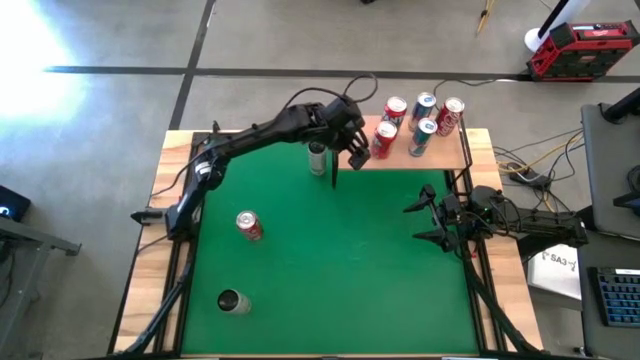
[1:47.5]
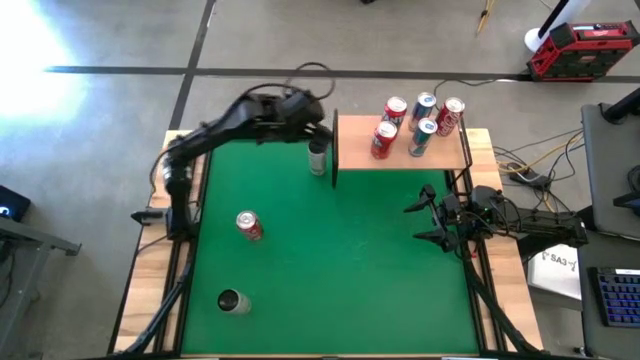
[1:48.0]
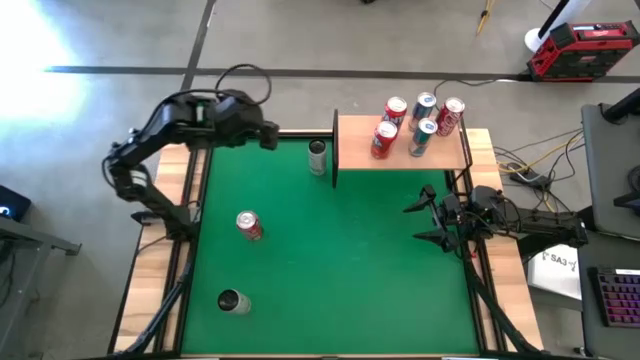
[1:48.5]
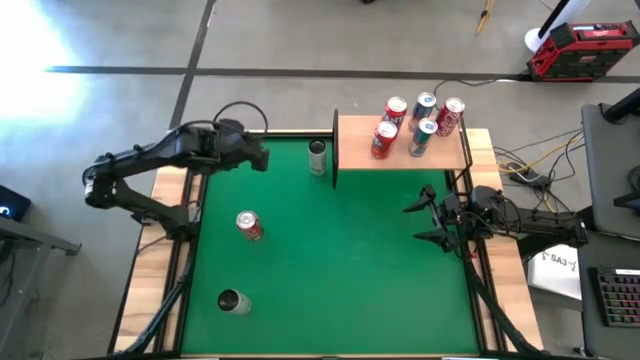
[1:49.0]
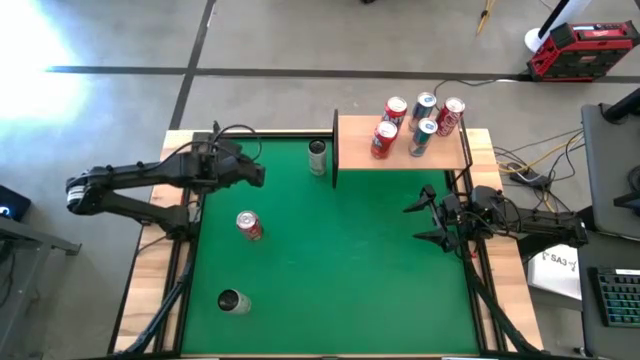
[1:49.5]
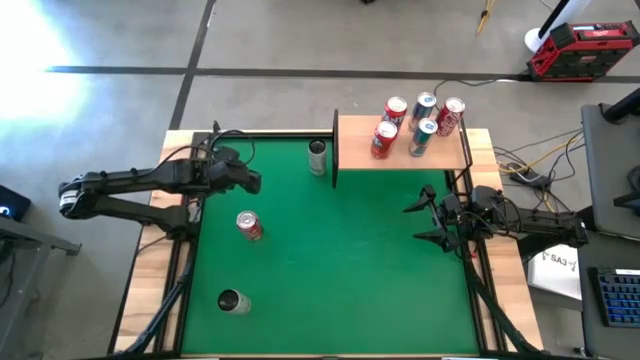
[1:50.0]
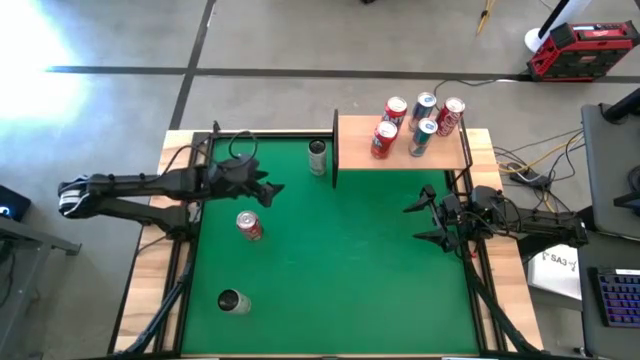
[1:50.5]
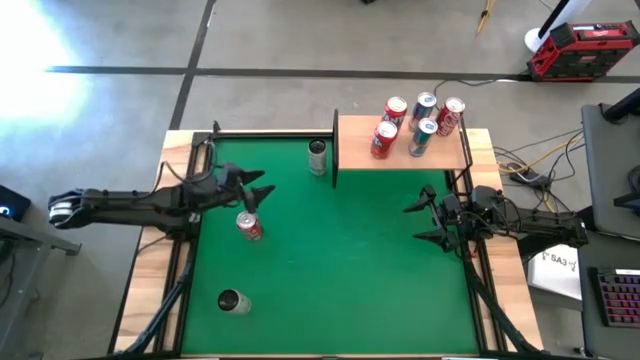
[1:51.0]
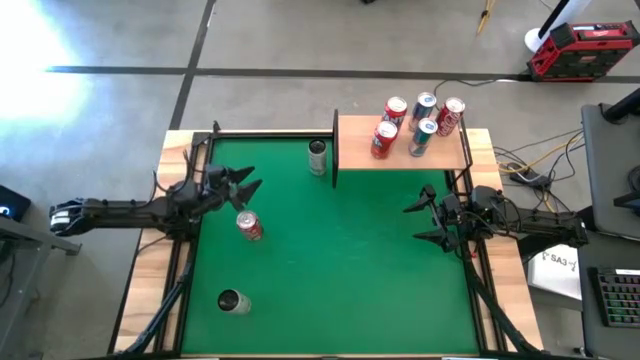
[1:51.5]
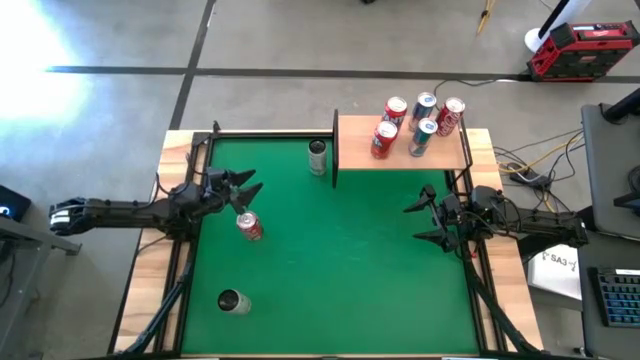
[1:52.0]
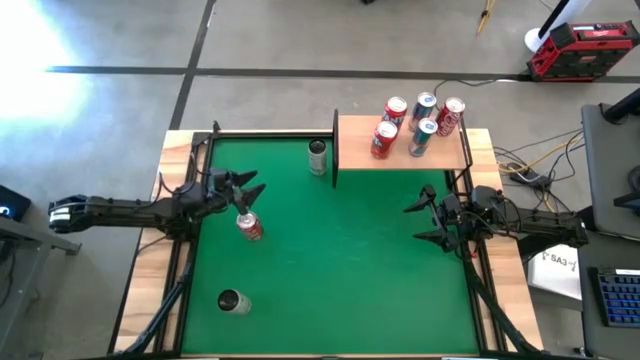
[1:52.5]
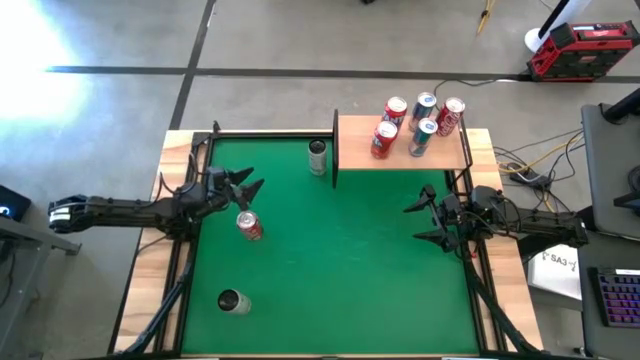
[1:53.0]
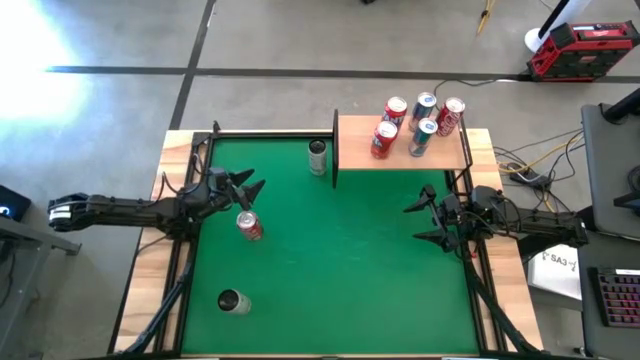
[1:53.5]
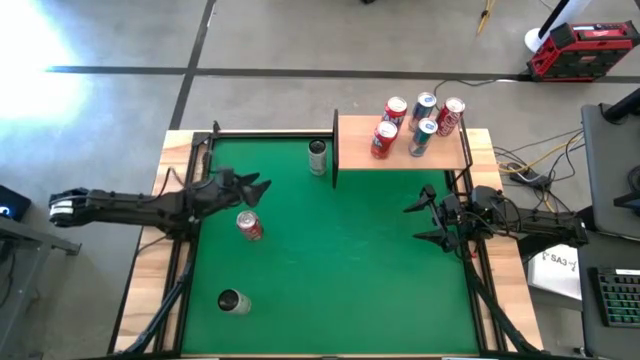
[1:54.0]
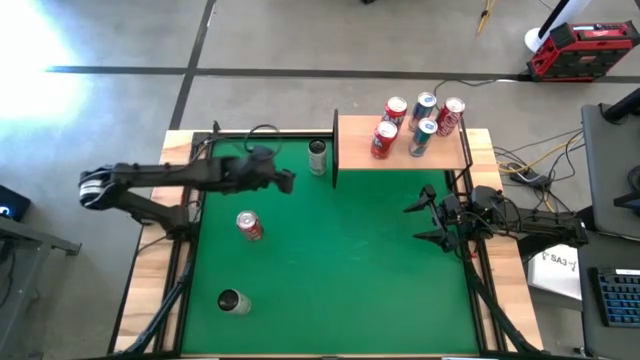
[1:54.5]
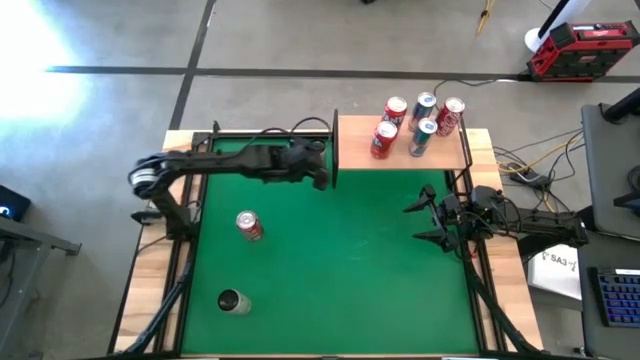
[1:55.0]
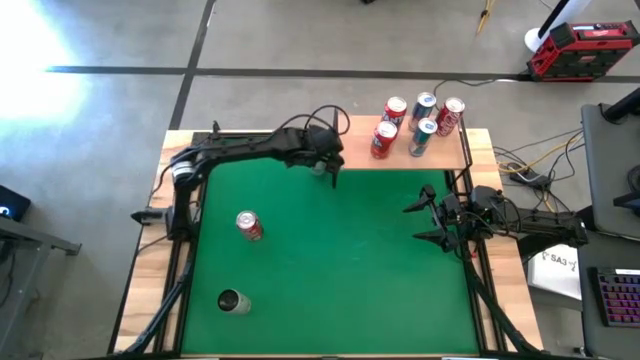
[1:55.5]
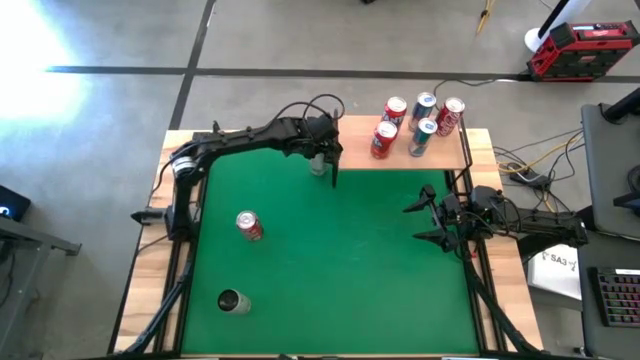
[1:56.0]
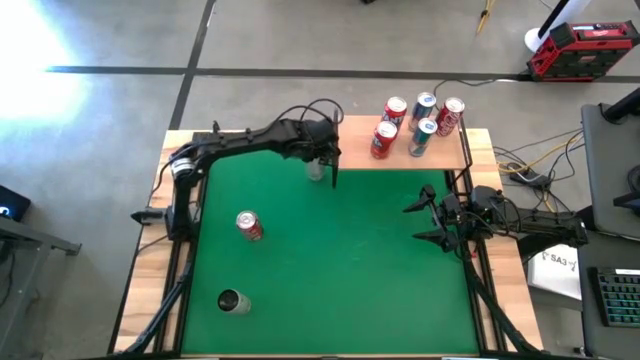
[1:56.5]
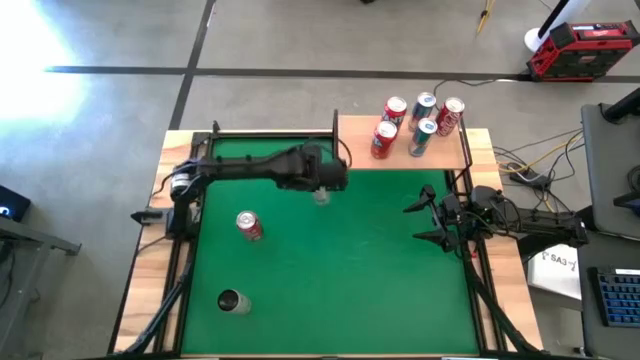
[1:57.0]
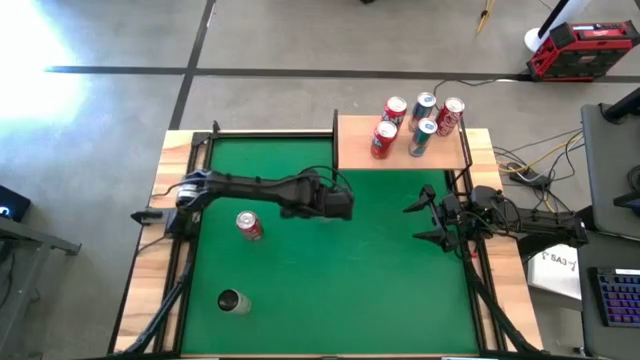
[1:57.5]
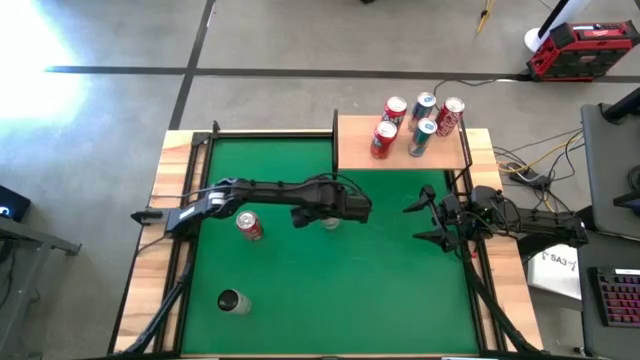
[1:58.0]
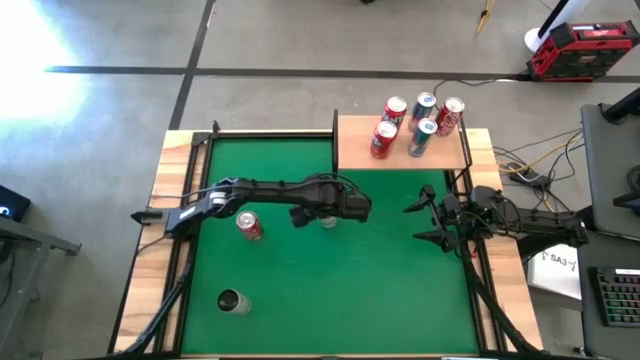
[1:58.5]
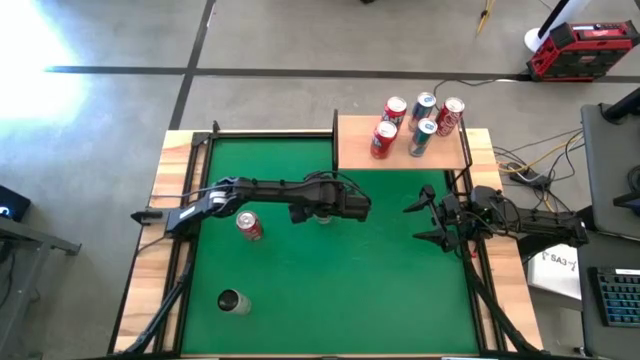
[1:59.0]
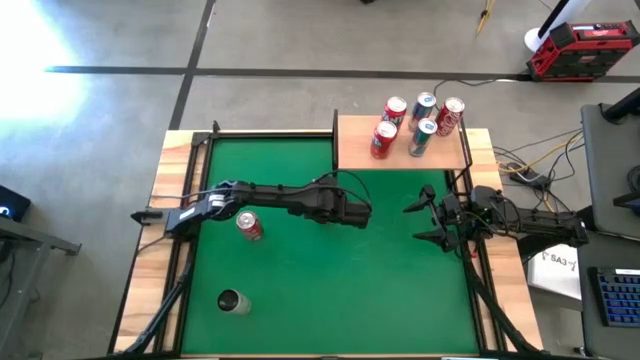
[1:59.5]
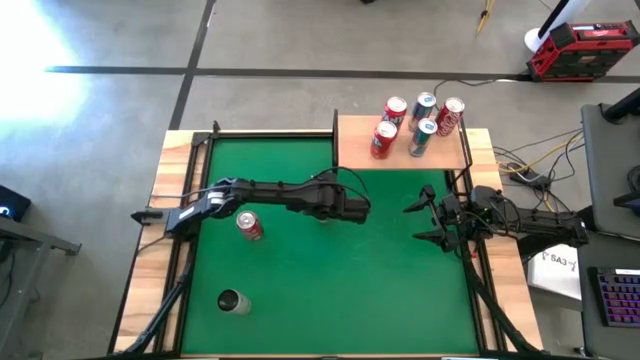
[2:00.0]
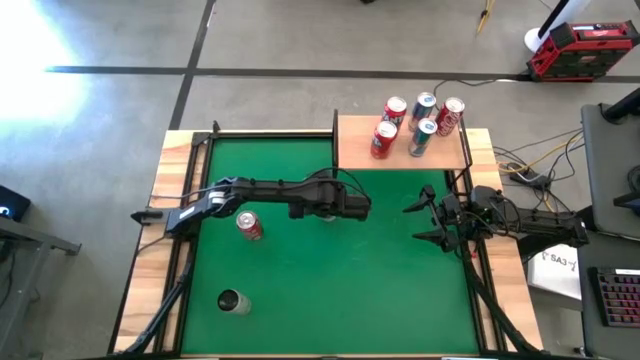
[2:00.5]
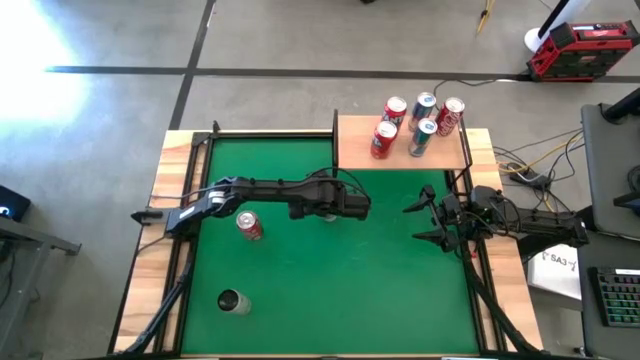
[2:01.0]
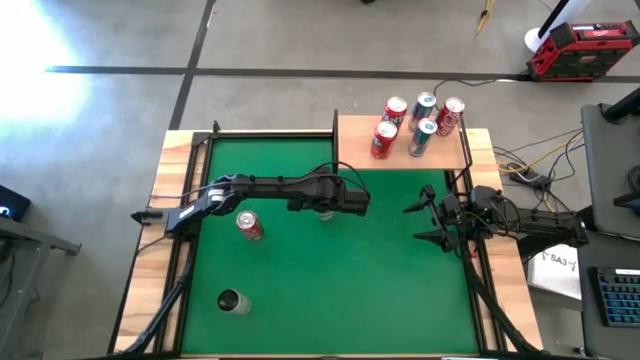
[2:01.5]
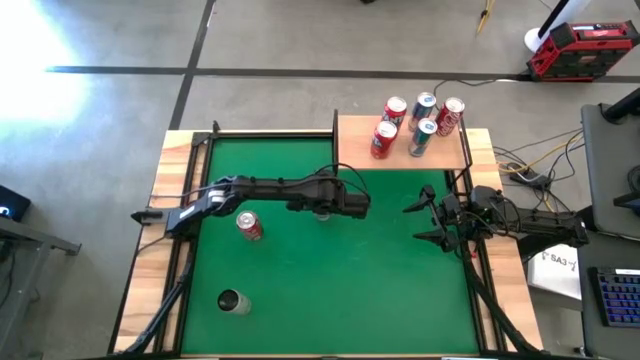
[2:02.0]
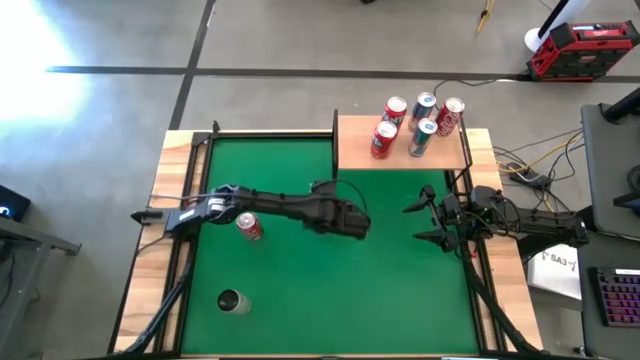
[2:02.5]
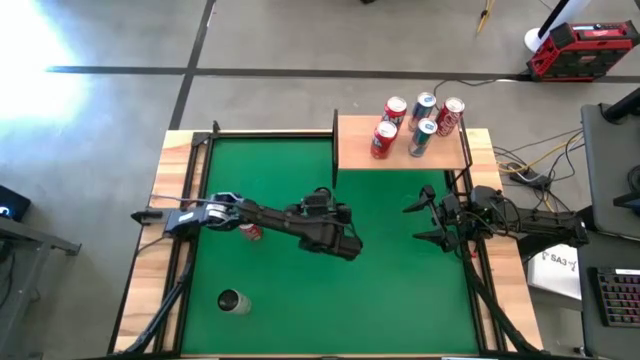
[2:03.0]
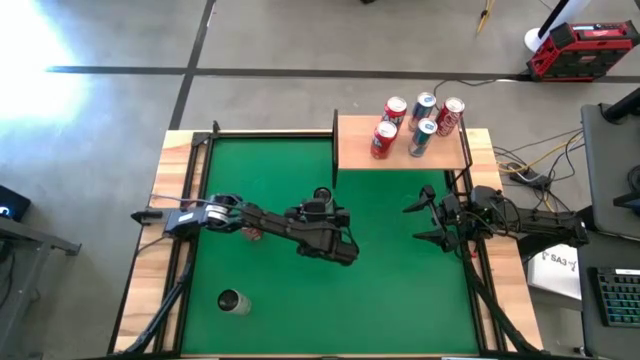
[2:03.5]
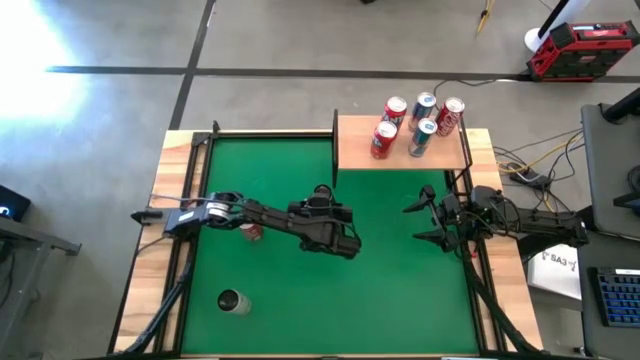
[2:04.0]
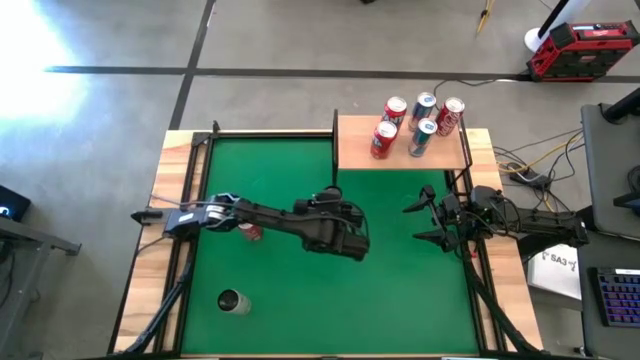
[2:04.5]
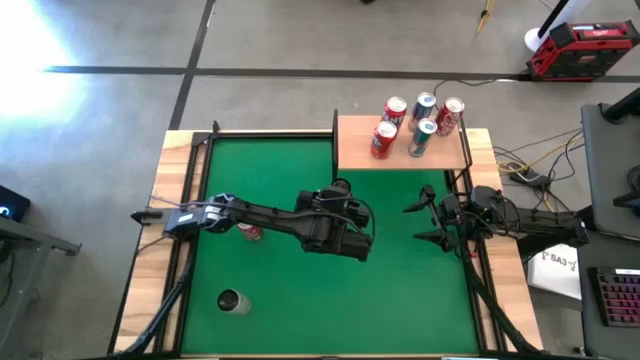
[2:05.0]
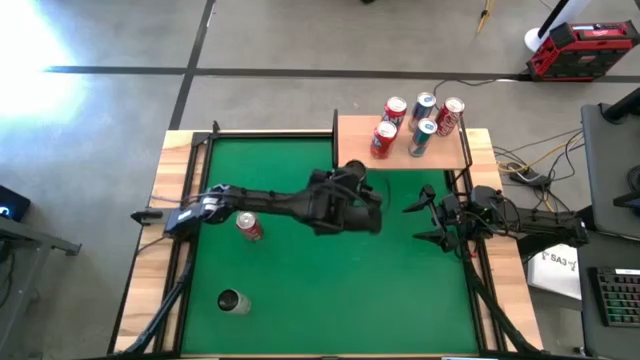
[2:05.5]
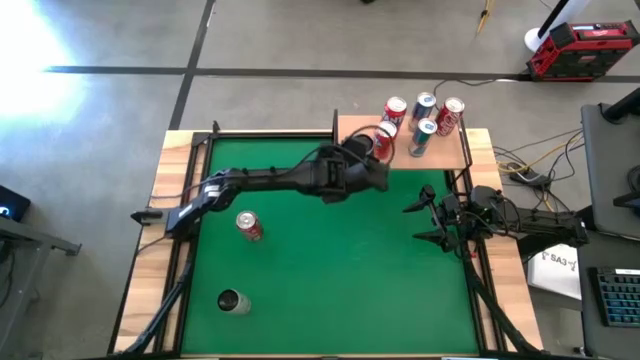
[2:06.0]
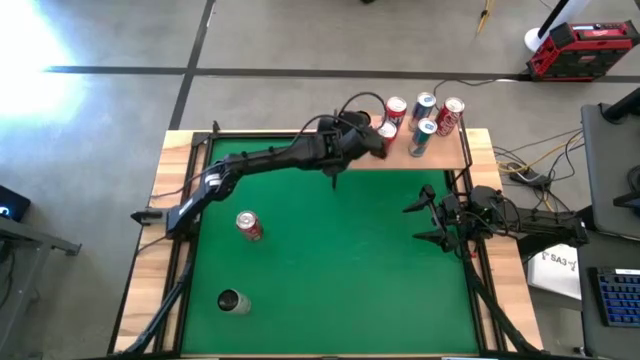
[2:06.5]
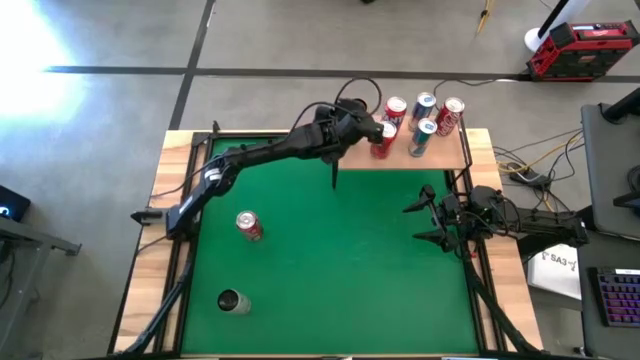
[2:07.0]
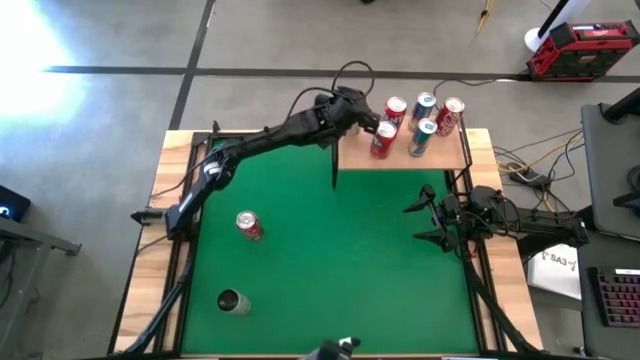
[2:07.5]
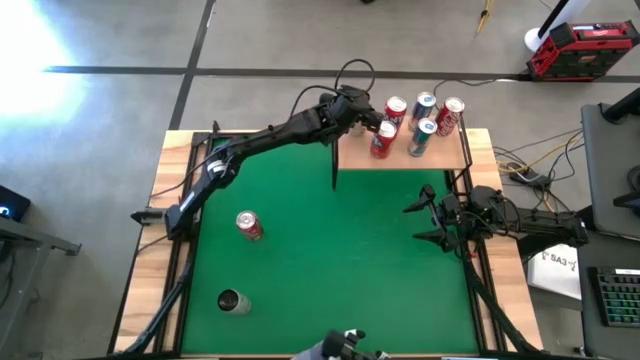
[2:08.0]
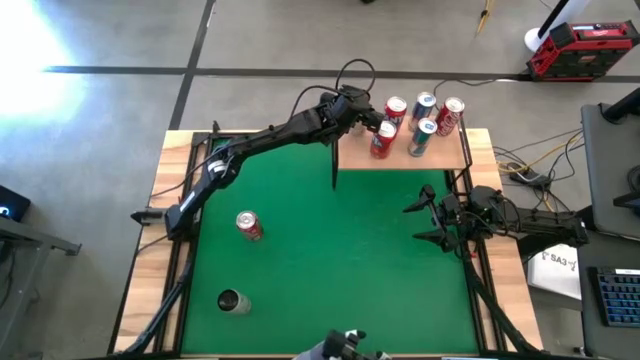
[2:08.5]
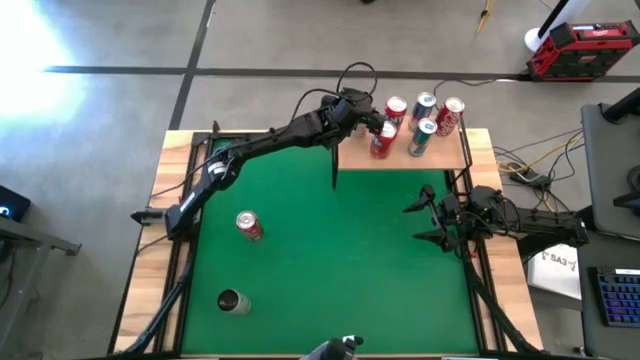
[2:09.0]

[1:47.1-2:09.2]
Task: Place canned beverage on shelf
Put the top white-yellow soda can on the shelf
